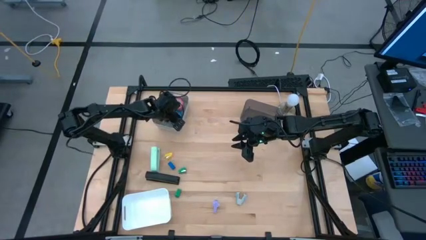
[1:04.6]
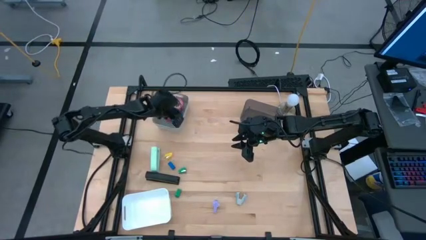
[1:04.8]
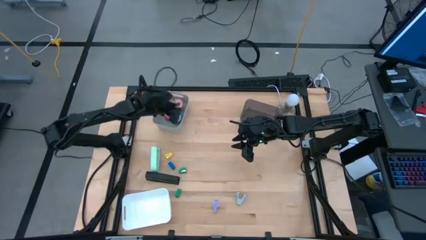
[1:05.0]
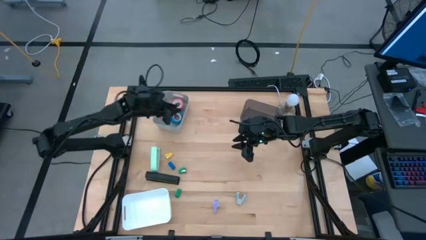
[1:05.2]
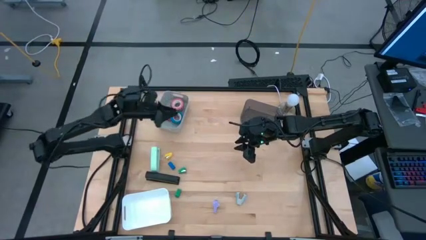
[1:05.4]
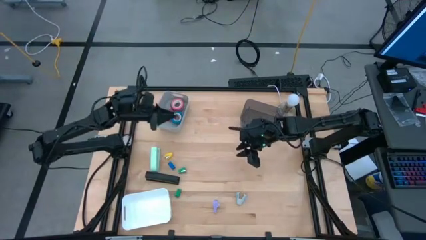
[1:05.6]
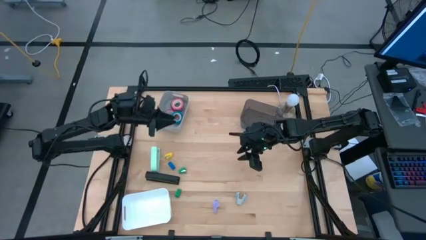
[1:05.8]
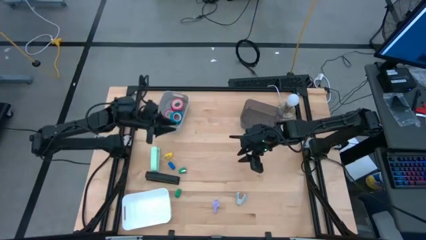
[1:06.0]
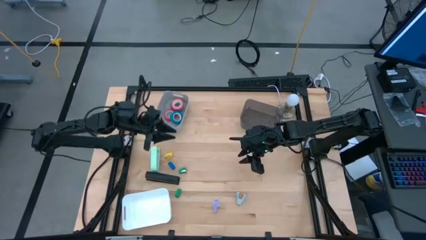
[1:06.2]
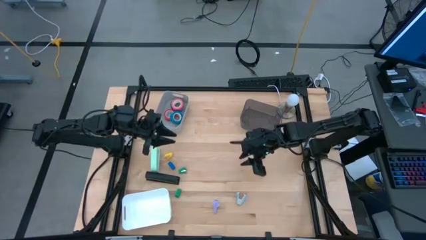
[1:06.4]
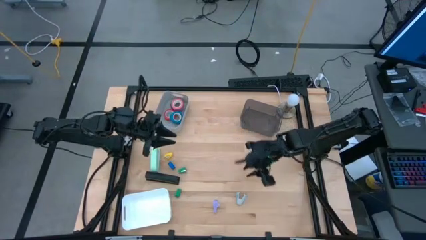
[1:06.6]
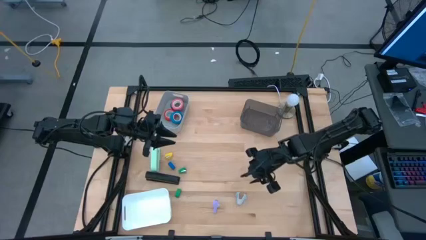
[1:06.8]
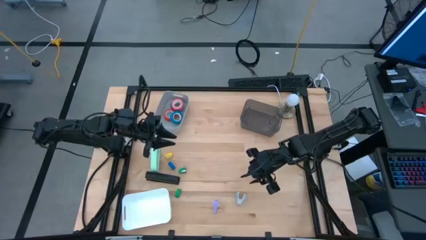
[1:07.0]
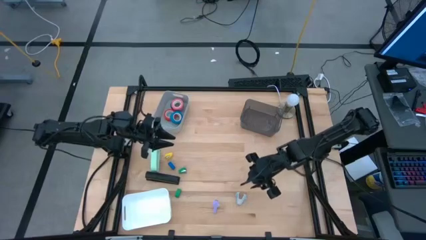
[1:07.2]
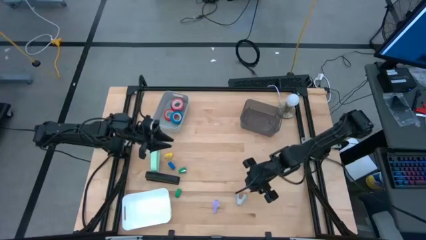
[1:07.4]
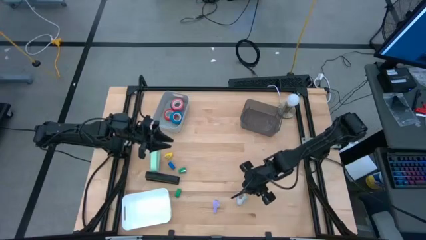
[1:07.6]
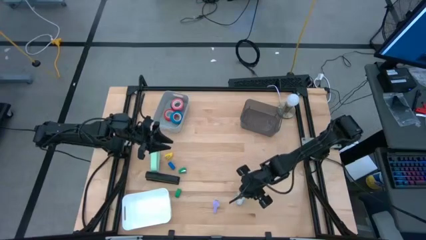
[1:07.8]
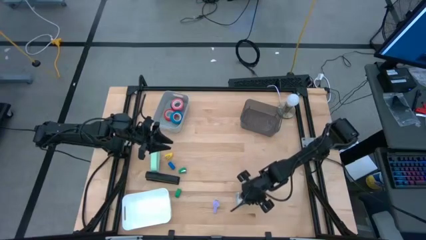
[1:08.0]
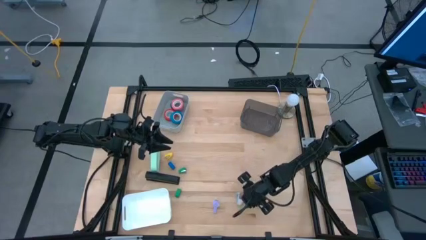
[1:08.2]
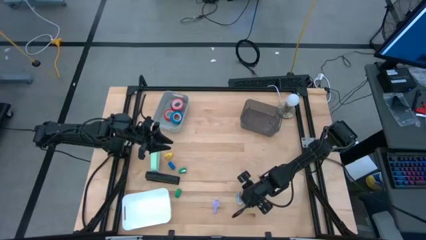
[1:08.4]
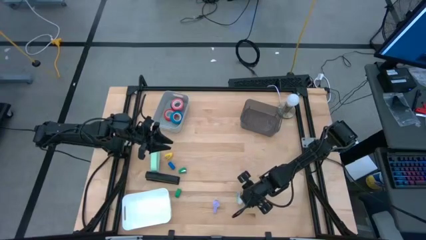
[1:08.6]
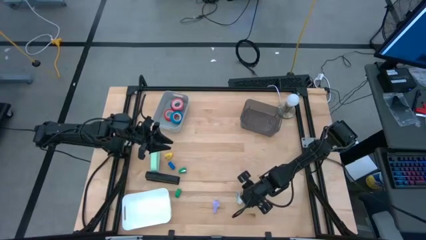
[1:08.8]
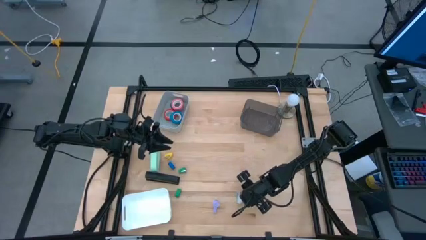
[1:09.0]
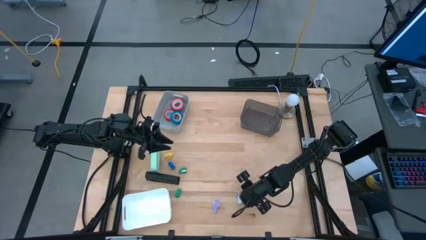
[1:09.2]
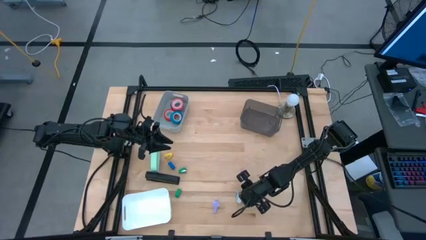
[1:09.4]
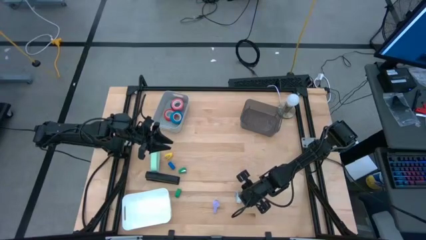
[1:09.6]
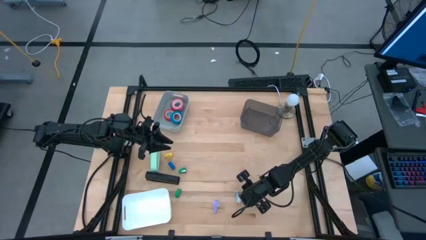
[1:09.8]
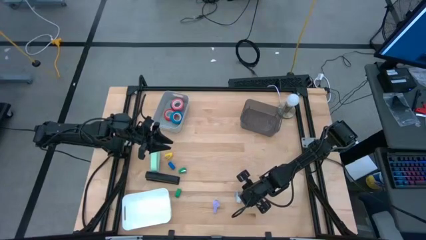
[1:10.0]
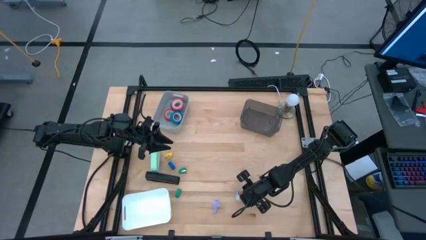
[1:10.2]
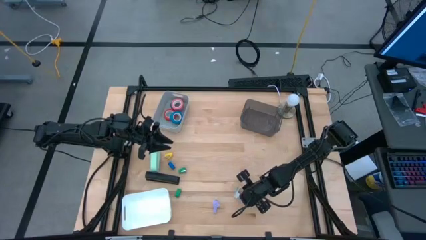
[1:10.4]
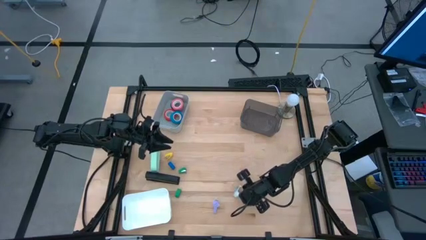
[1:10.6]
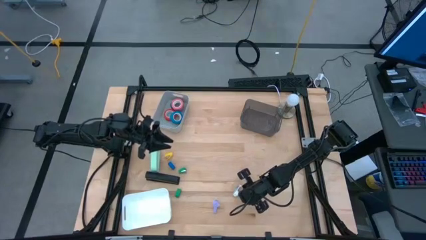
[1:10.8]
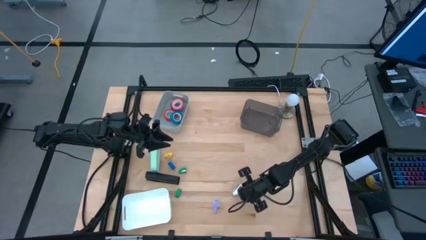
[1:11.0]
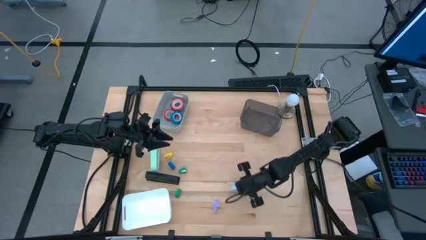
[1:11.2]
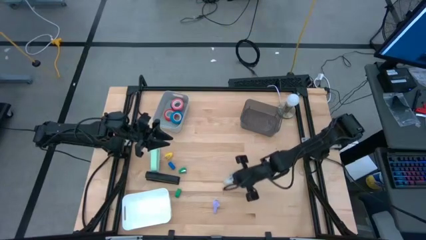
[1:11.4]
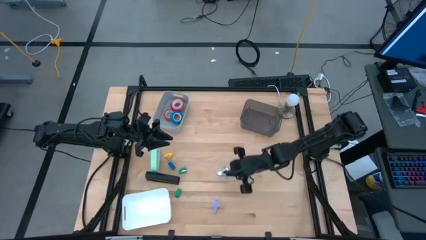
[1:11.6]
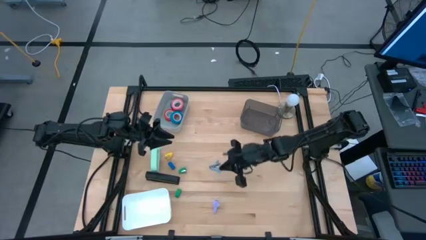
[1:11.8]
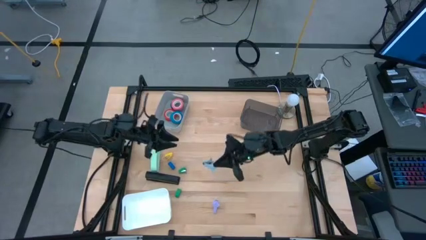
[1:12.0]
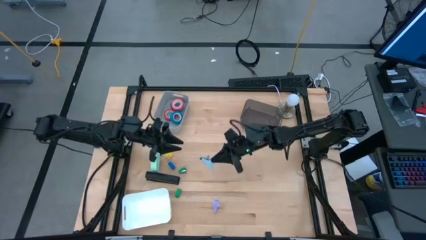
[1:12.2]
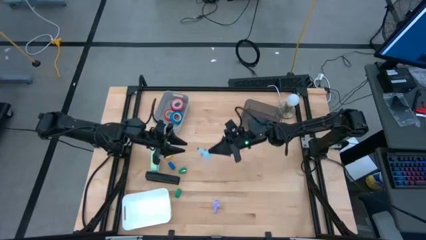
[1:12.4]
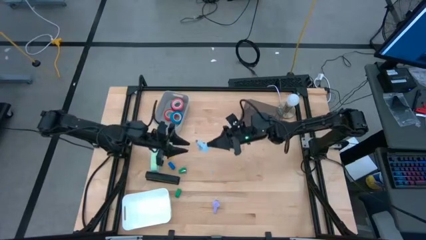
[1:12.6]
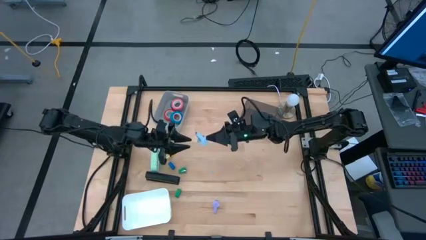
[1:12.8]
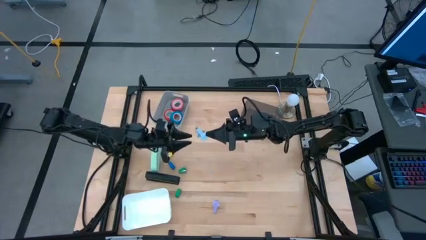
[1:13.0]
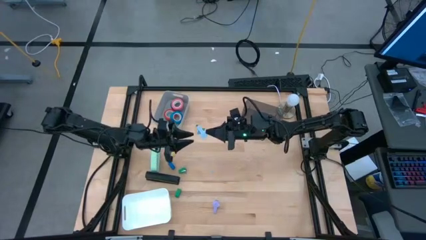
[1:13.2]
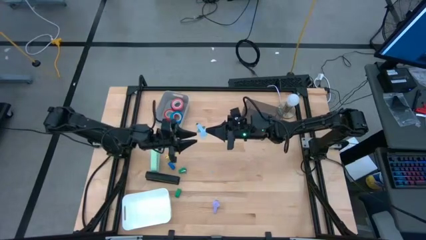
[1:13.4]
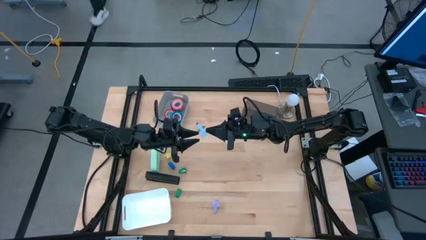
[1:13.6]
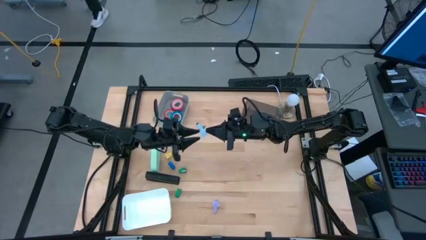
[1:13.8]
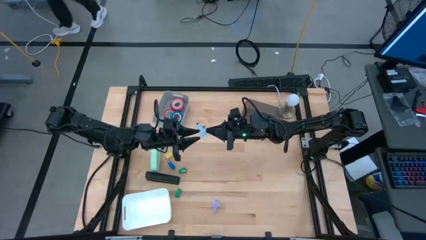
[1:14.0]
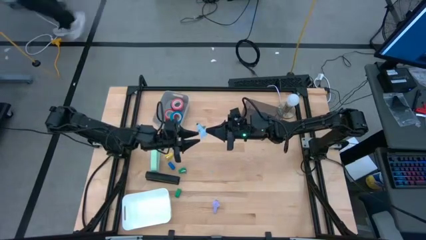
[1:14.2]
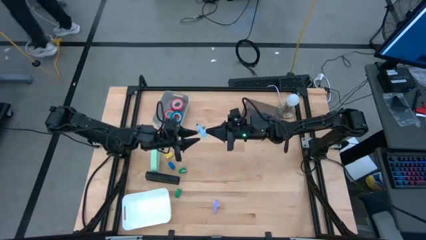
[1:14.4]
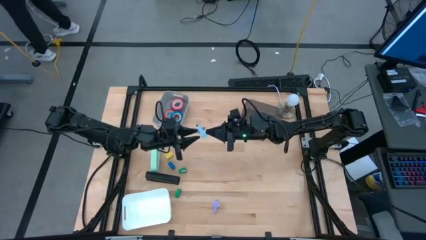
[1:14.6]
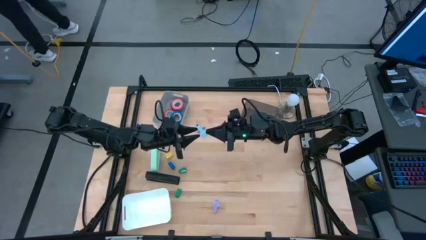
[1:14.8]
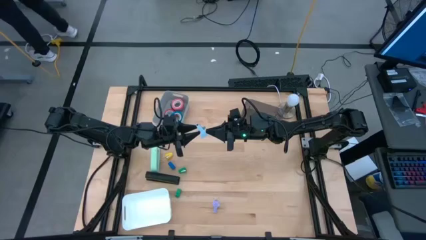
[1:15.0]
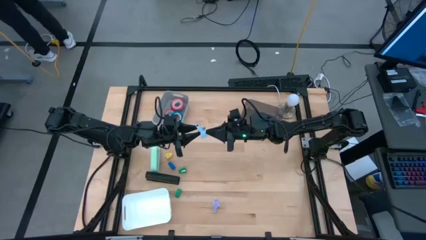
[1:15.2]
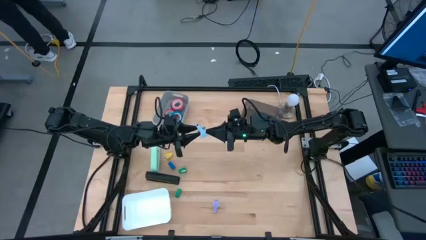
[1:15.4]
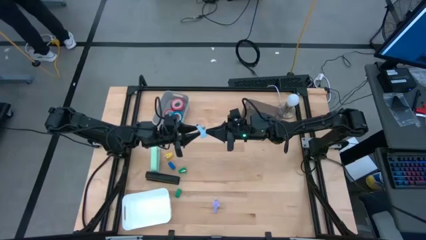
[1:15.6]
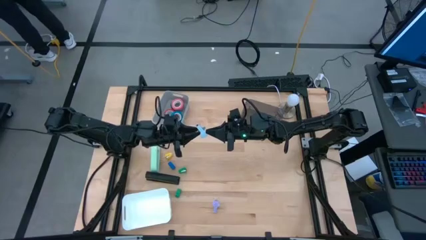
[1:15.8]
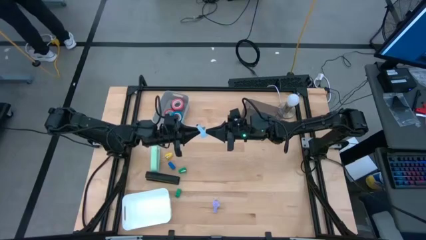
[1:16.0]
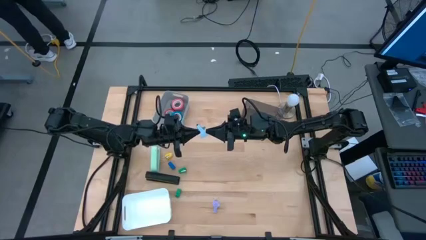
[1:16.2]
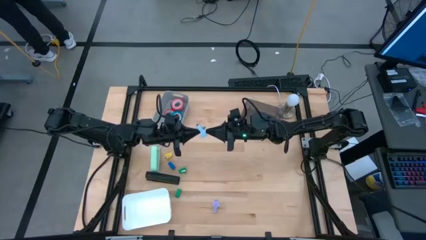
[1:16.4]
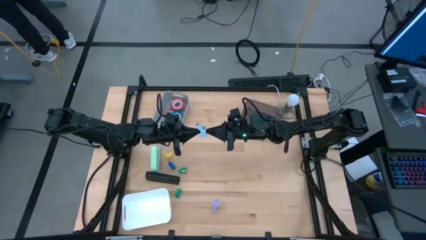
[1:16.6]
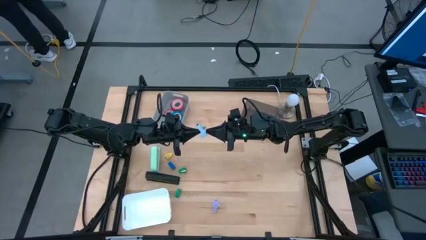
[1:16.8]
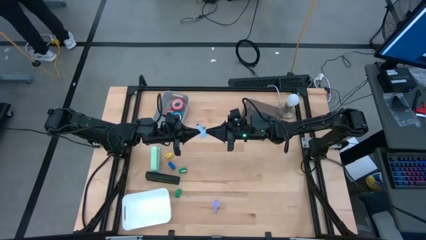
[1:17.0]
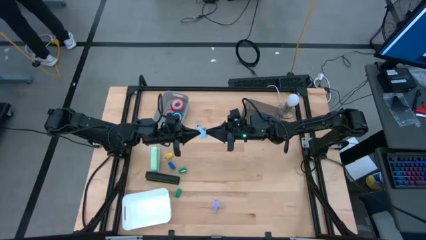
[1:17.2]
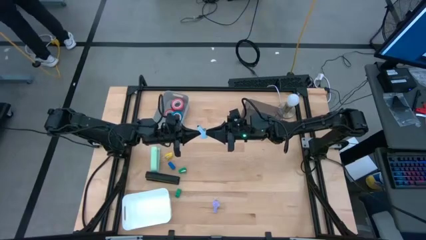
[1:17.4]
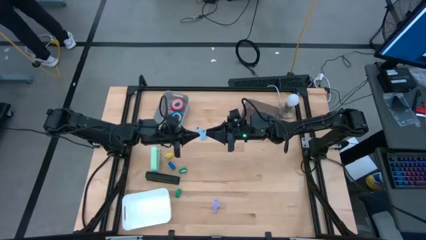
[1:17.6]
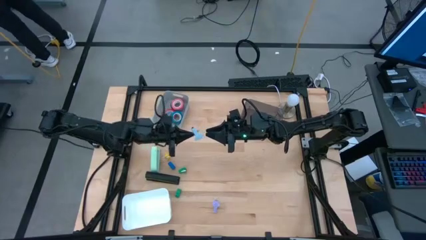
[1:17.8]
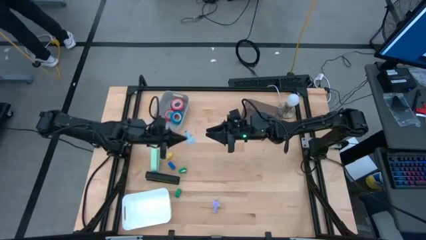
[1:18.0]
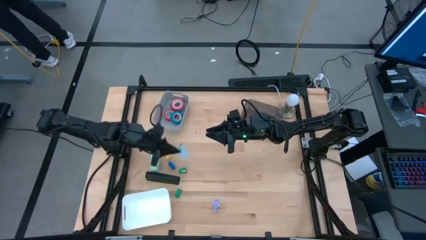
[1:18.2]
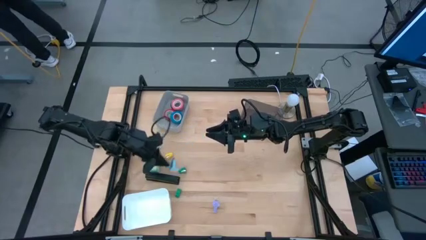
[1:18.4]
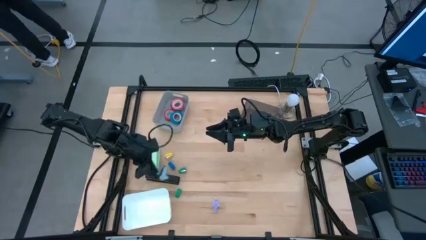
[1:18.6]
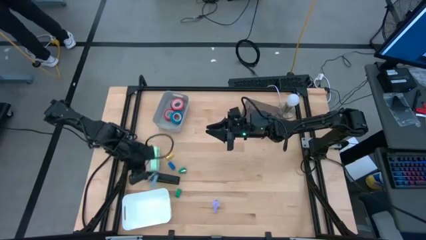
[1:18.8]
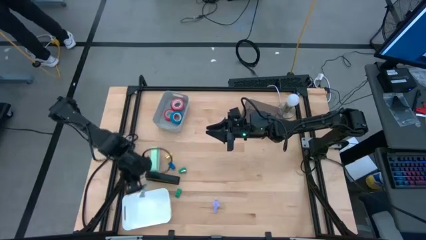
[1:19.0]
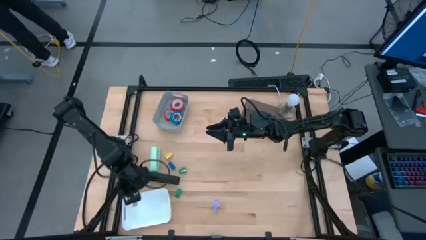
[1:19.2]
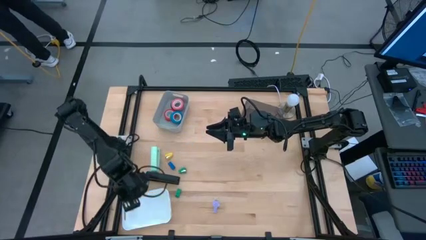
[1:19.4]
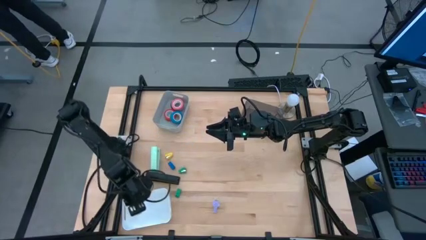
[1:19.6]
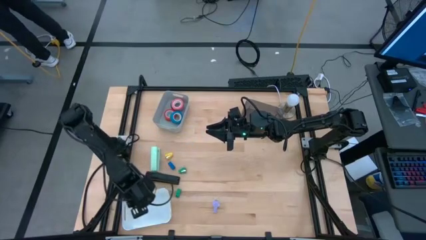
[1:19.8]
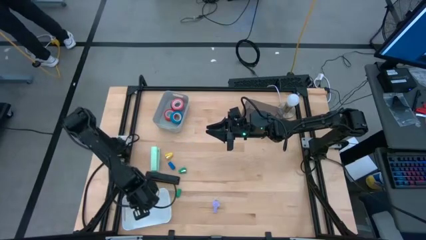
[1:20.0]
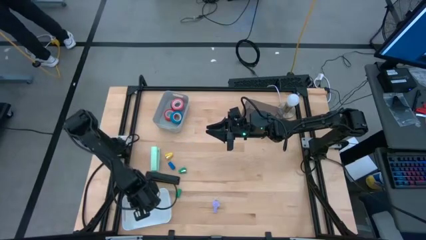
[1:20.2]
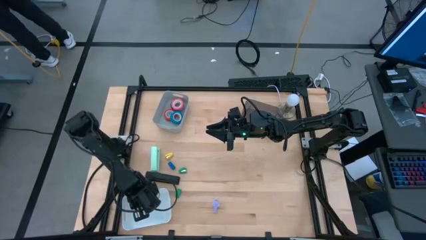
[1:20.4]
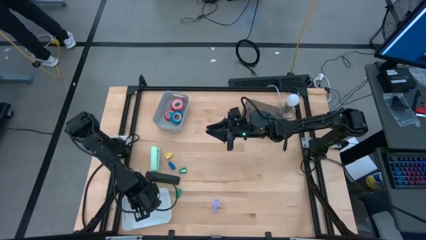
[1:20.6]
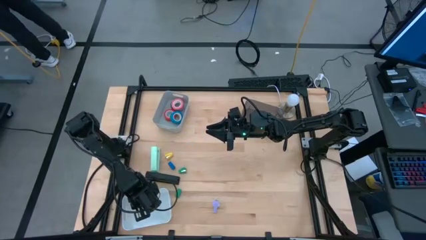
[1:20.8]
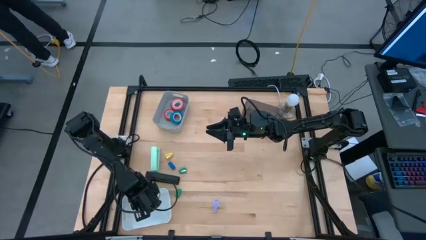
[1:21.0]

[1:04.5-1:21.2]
Task: Pick and place Stapler, Stapler remover, tape
Put the light blue staple remover into the white bin
